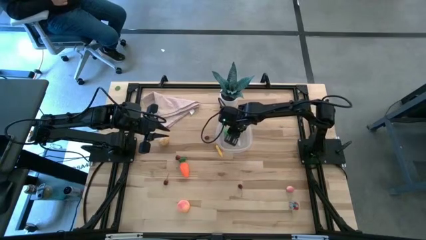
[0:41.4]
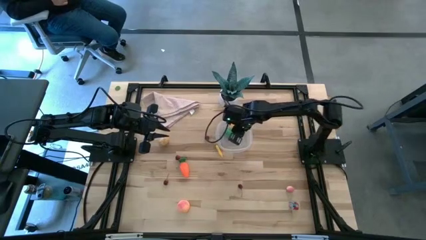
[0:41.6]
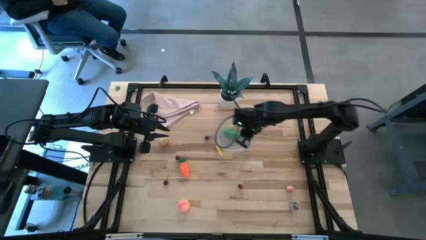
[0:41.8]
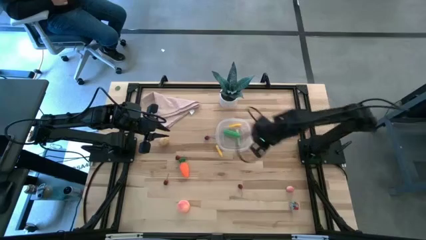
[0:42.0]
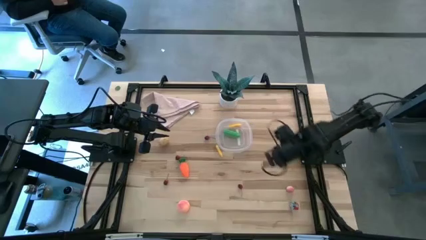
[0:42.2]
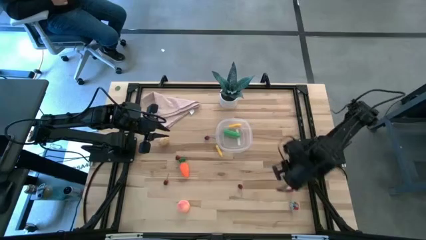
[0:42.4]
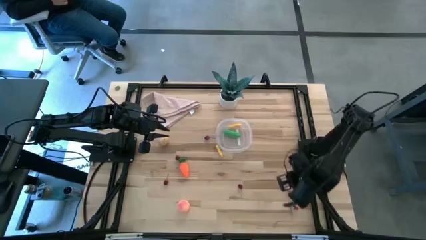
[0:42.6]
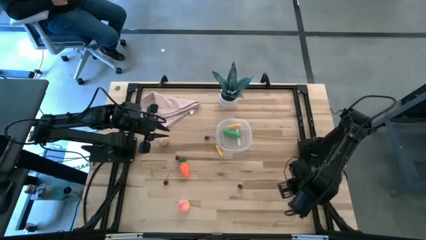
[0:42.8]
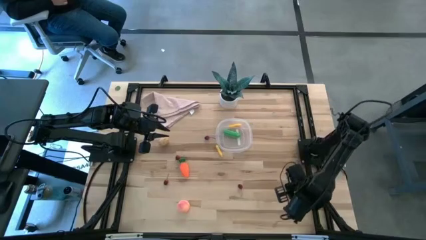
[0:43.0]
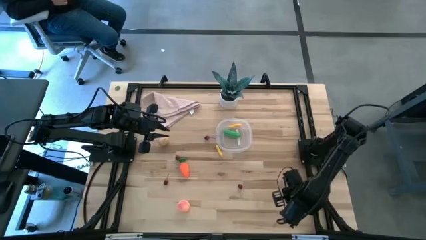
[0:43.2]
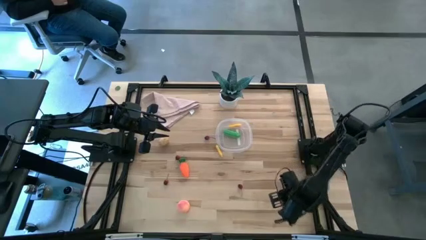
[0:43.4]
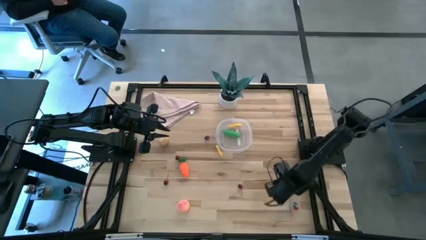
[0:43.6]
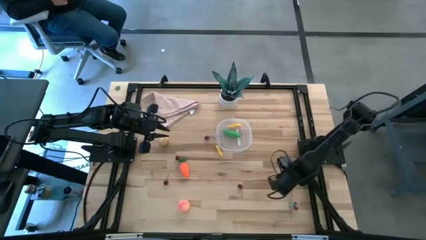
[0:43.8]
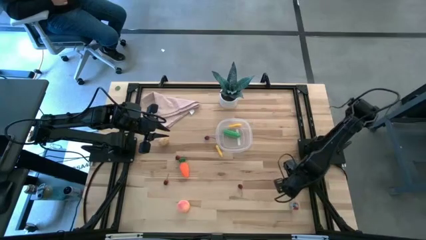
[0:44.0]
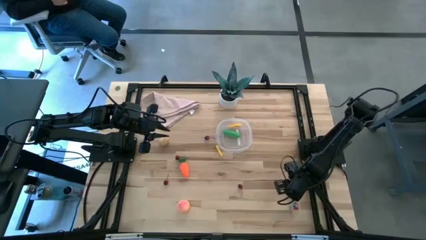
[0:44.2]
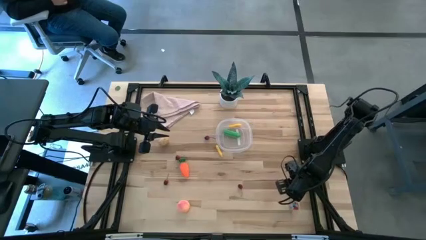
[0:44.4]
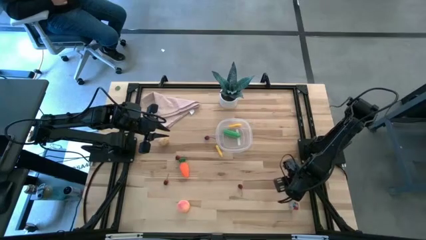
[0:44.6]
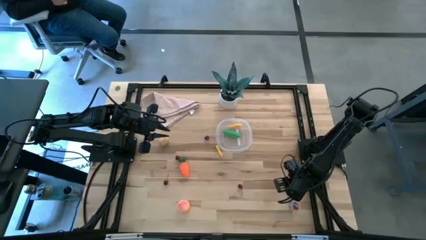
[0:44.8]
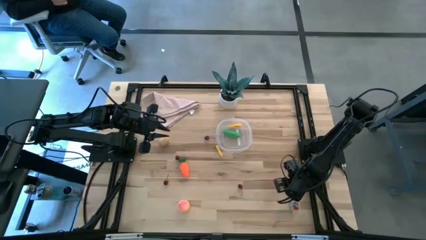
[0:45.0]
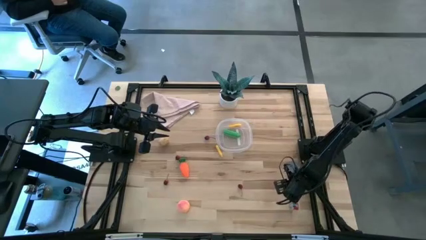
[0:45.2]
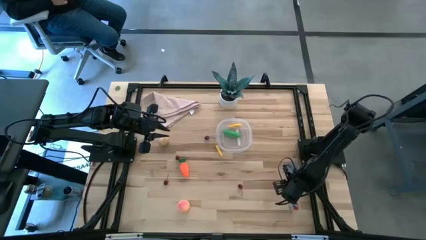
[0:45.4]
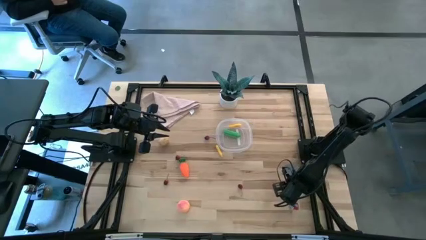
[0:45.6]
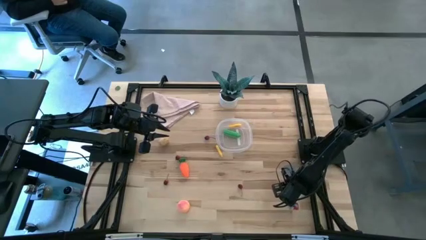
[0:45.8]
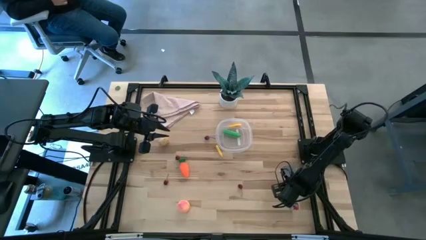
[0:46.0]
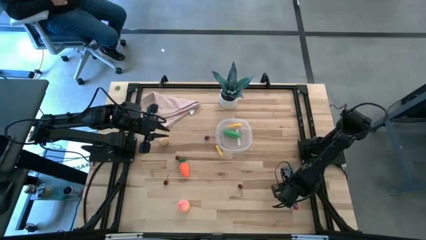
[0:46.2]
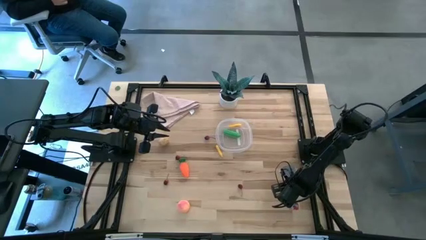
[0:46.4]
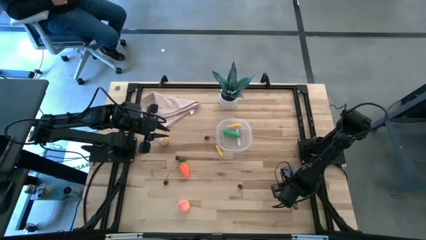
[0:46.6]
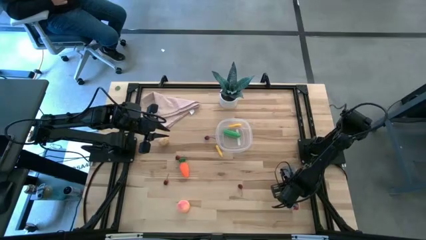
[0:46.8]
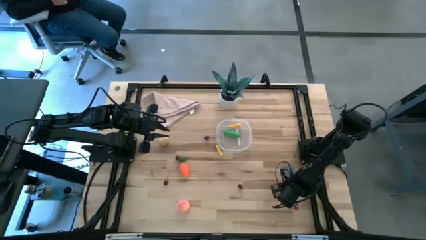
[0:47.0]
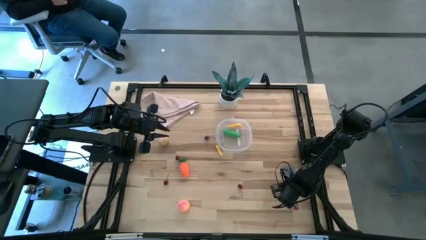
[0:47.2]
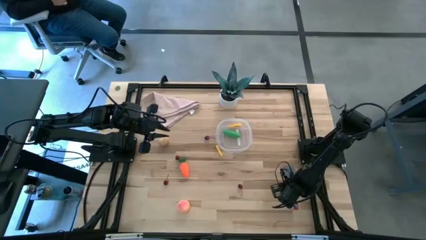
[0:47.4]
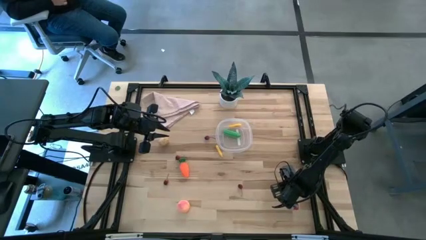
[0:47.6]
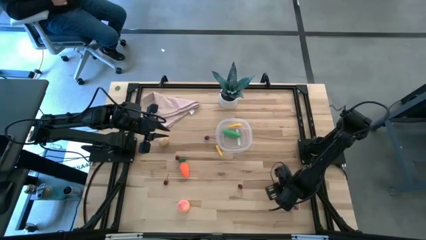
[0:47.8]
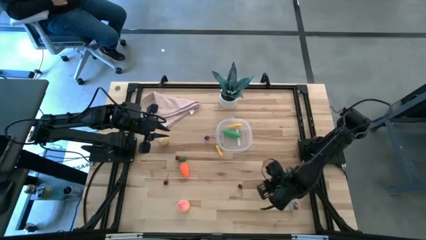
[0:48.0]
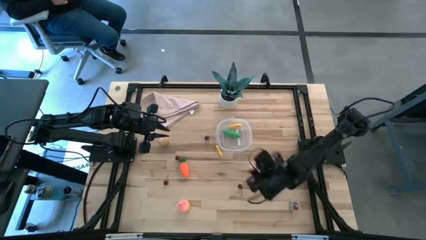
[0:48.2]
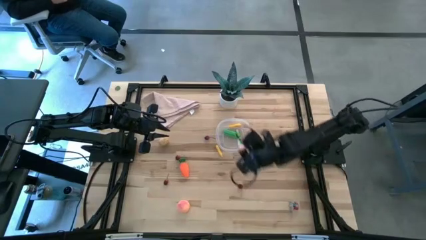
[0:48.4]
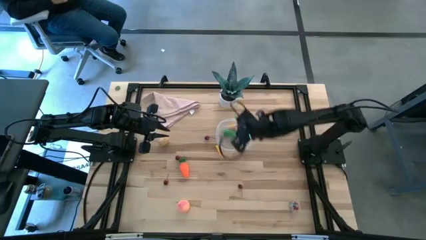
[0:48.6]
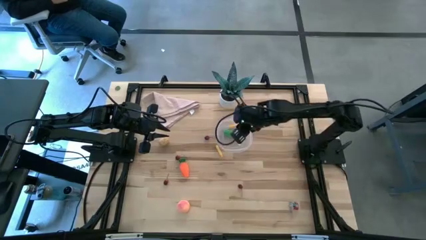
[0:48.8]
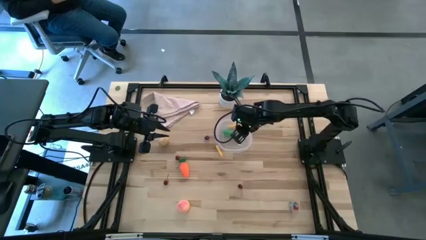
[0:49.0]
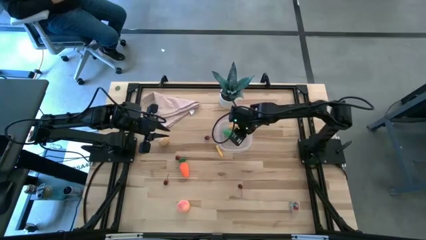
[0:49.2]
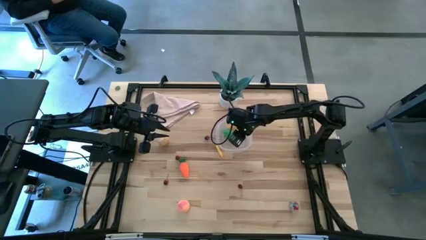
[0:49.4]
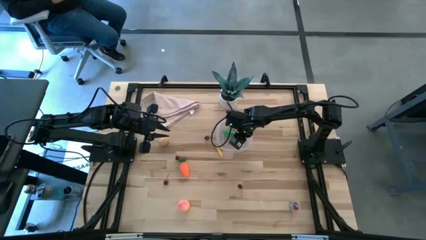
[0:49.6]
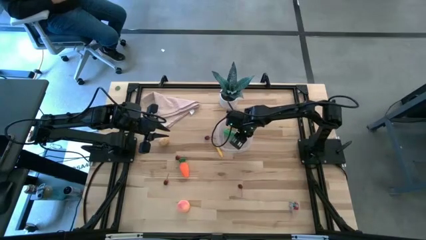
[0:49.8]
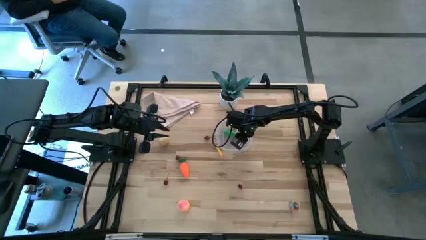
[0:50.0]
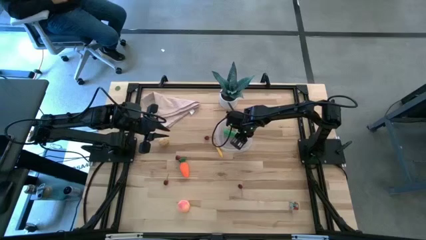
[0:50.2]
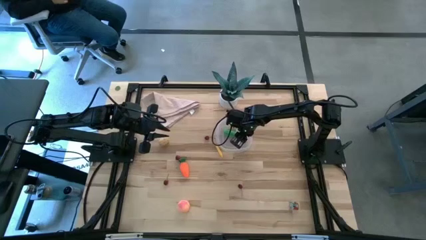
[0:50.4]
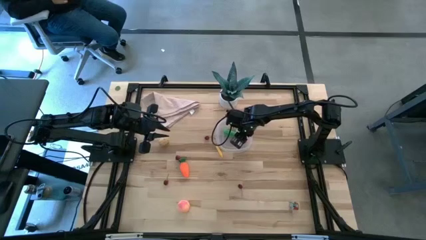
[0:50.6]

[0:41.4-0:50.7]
Task: Pick and placing Produce into tupperware
Put the peach into the transparent bin

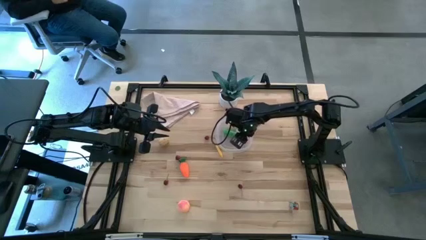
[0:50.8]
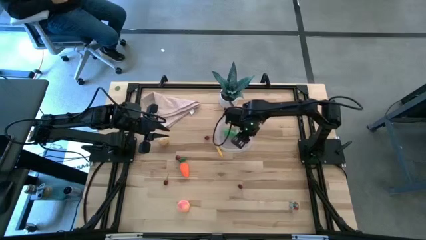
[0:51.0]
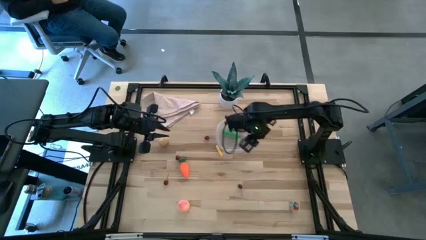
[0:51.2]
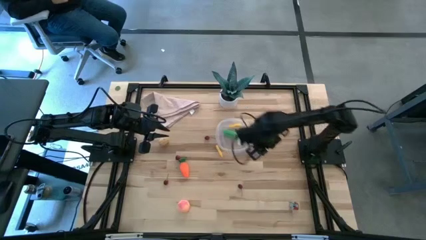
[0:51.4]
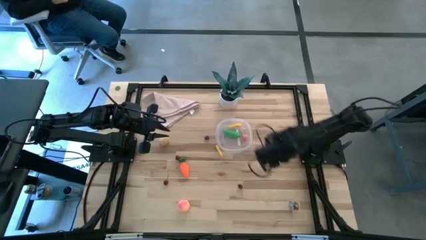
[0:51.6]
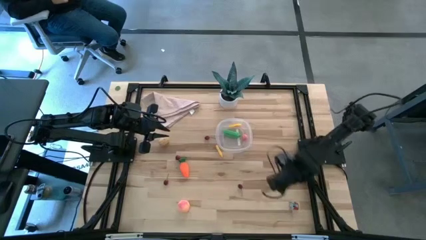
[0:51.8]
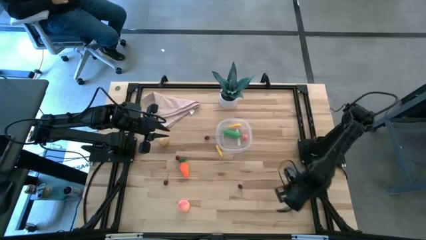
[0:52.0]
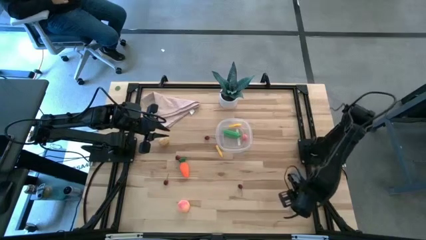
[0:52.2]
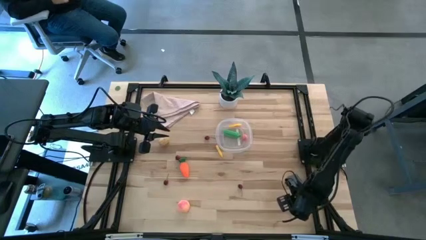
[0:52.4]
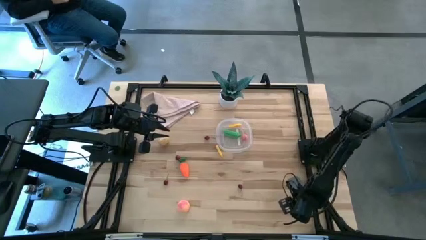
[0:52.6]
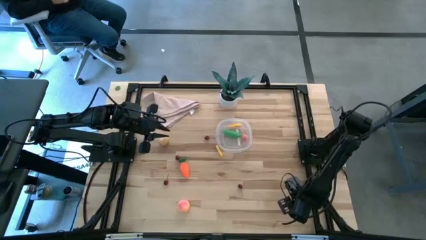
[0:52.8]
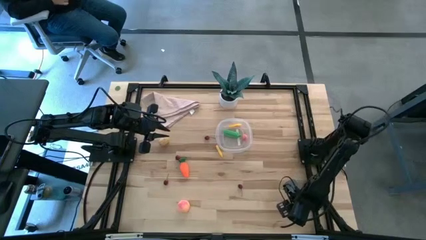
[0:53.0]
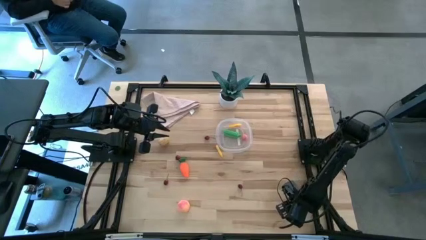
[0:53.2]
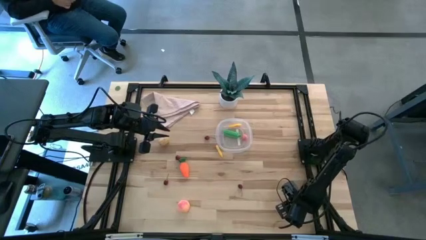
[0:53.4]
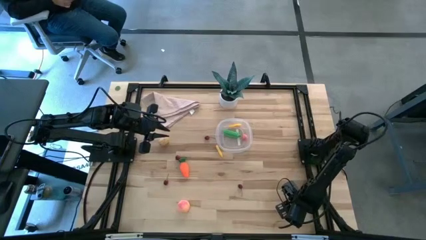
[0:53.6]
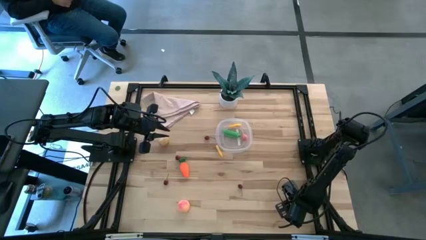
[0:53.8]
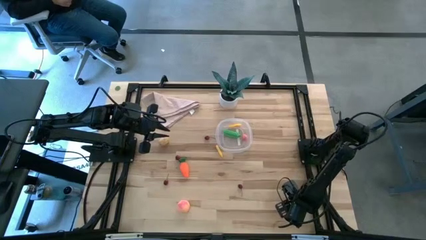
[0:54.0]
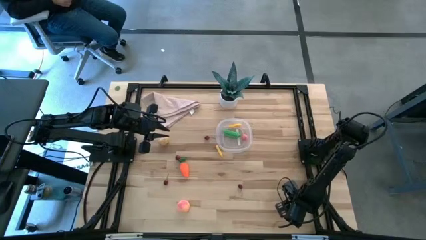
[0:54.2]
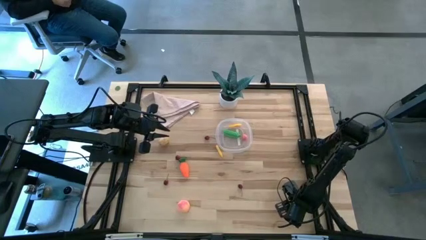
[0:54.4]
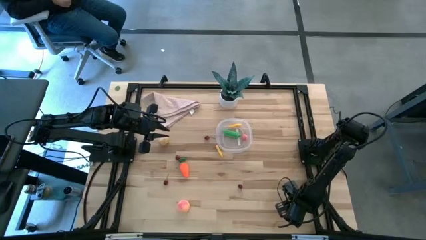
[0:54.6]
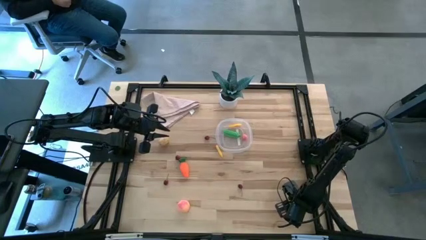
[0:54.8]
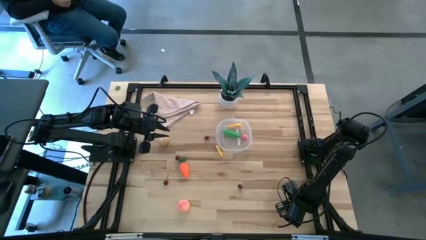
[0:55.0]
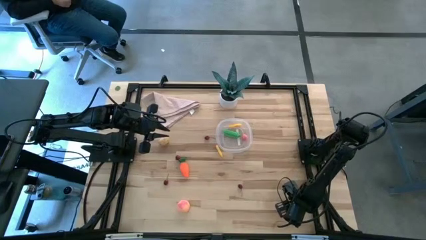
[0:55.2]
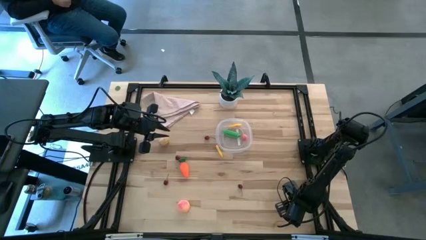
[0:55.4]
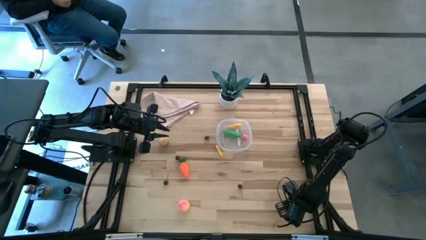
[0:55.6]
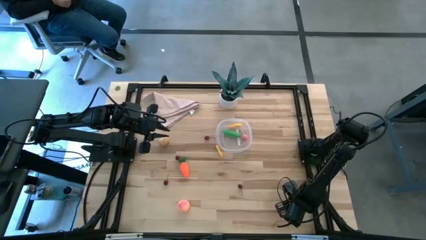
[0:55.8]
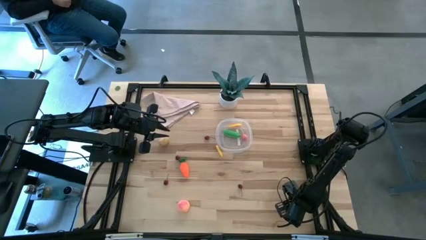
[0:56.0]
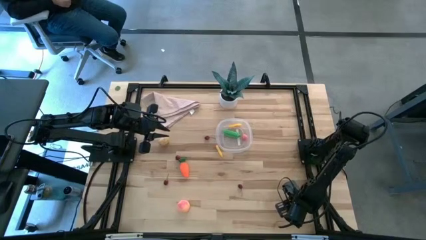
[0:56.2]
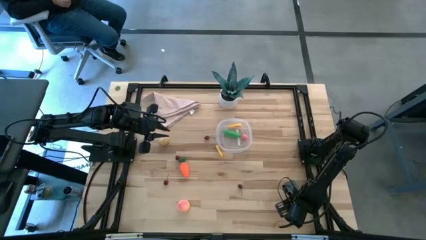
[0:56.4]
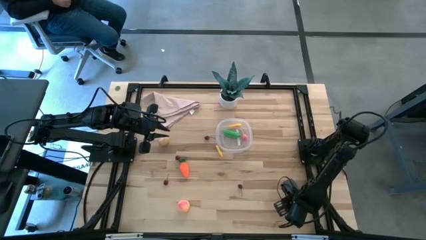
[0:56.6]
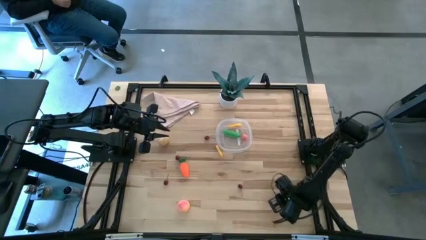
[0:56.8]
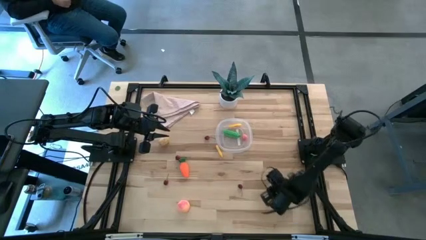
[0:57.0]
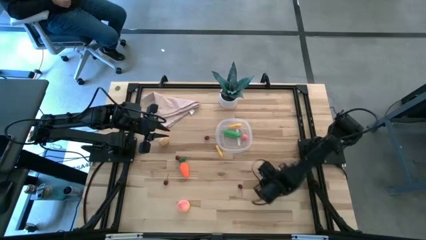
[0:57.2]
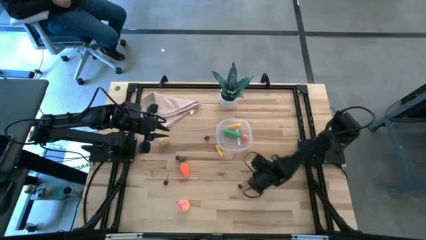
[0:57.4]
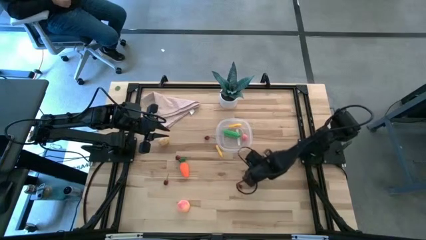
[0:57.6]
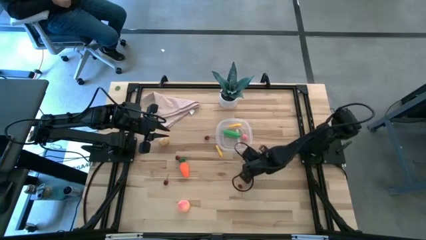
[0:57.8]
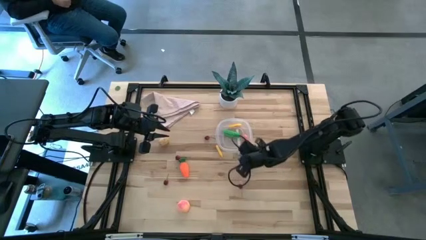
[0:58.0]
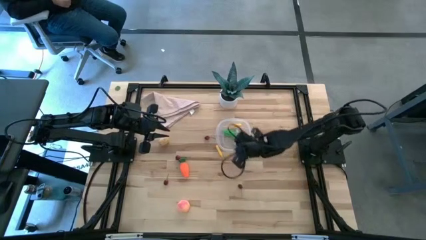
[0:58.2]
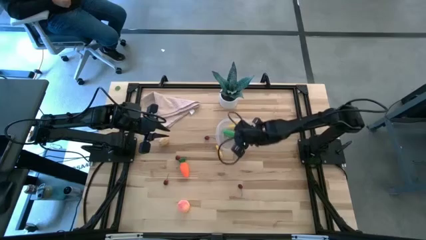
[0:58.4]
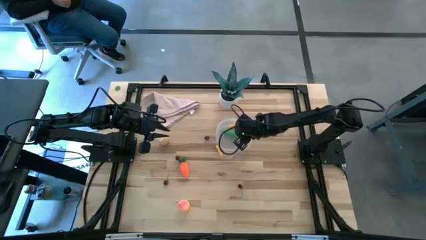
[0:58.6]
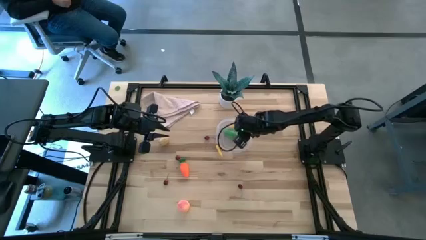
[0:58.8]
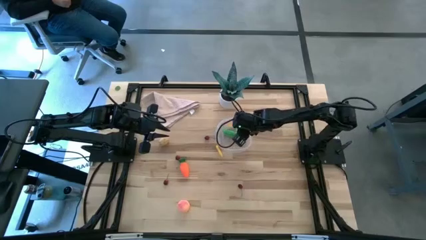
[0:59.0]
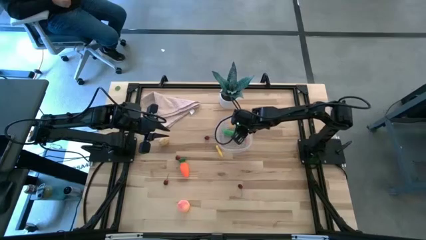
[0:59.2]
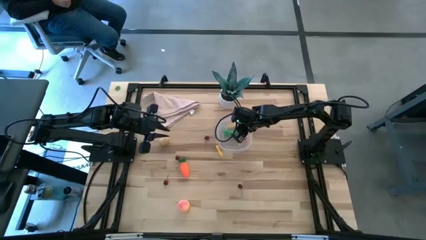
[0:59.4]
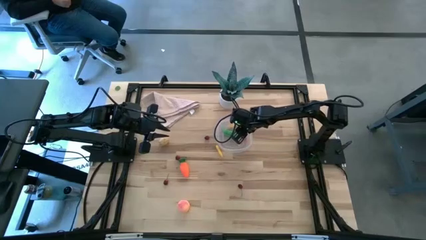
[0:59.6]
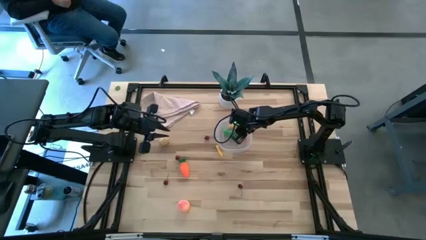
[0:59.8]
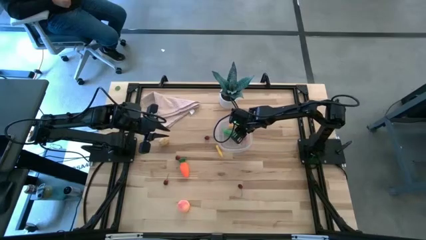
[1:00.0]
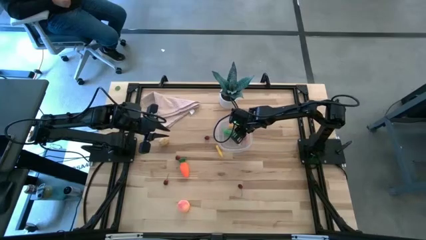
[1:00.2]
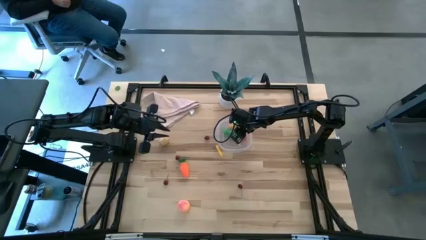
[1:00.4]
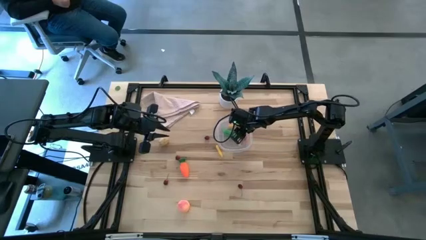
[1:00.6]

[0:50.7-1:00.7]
Put the strawberry into the transparent bin
